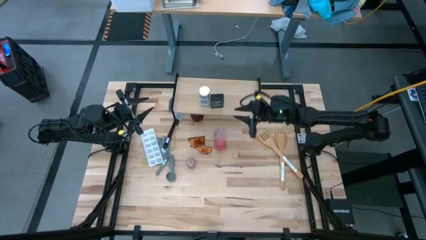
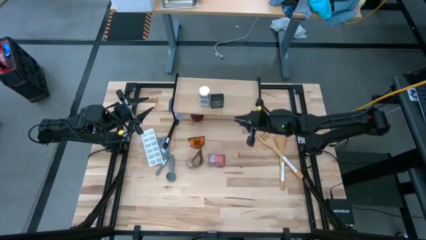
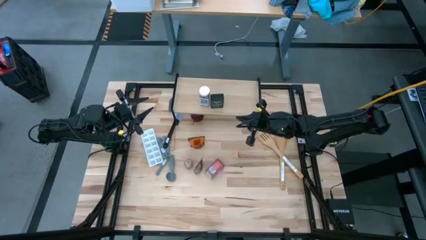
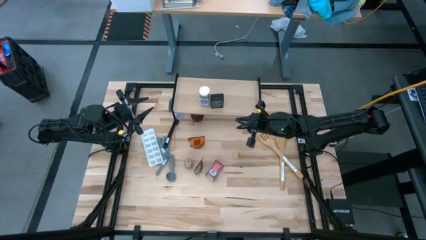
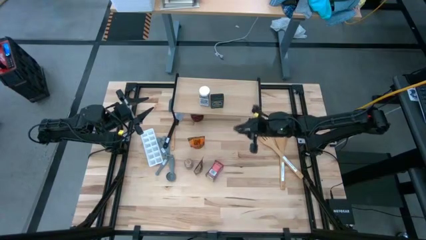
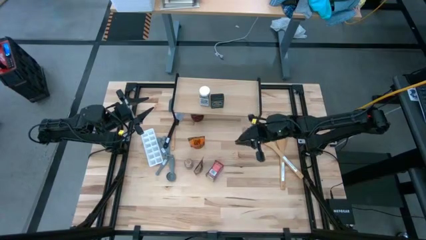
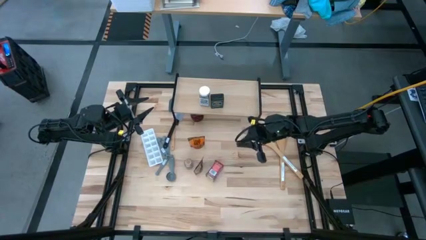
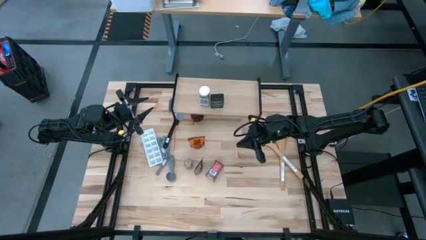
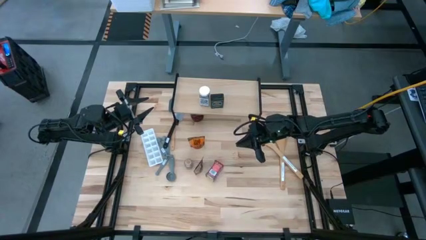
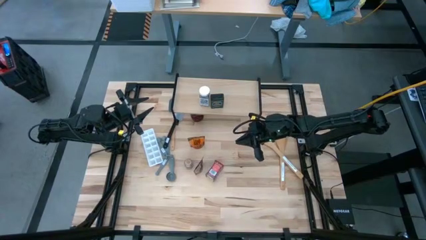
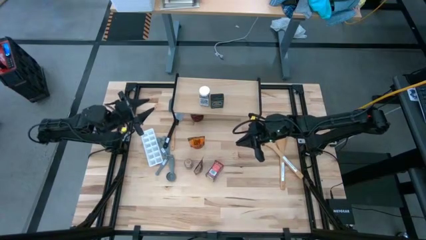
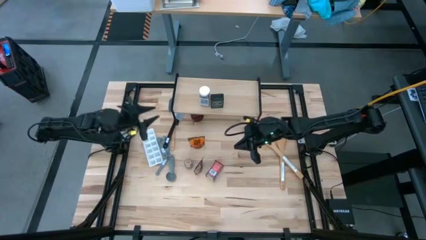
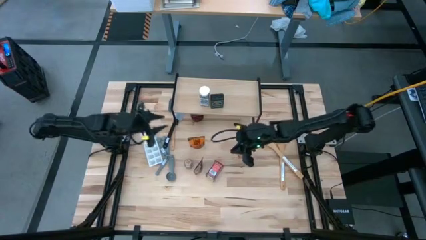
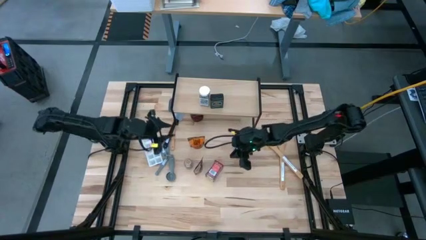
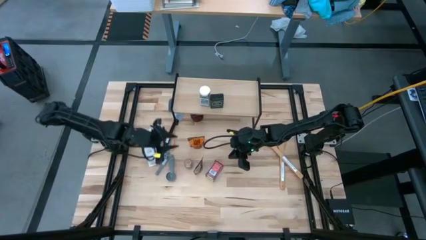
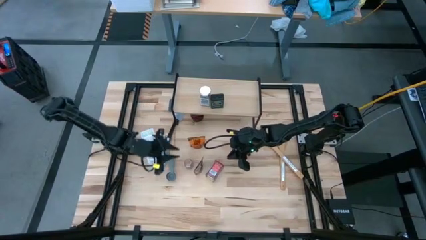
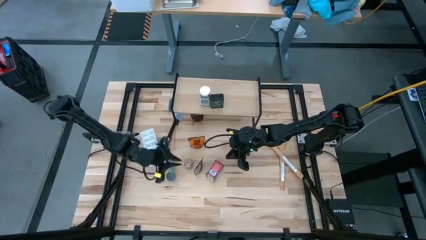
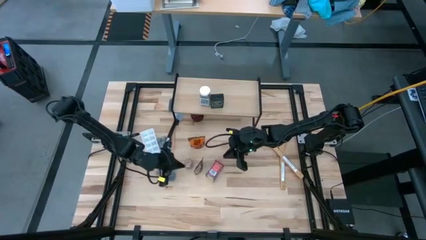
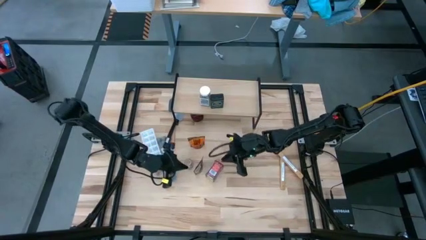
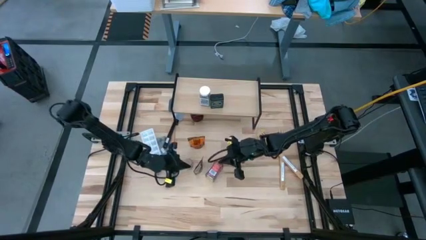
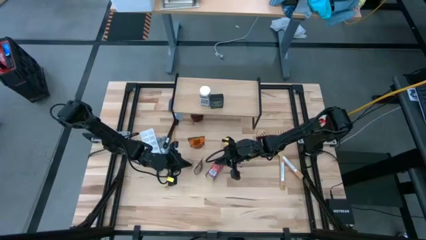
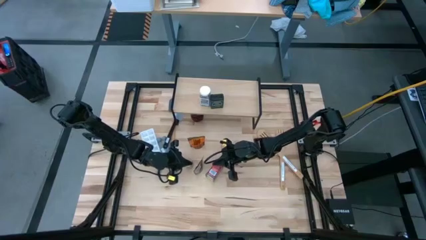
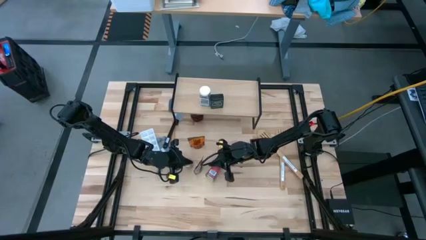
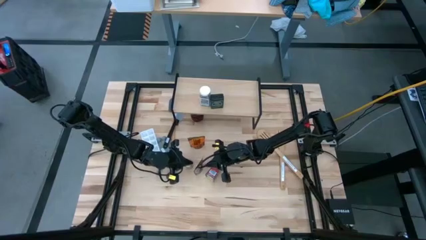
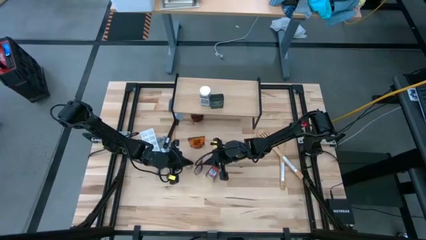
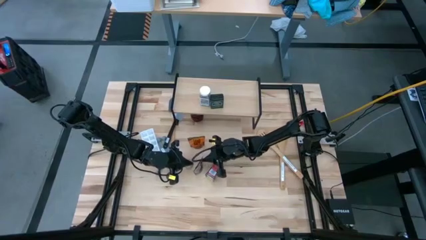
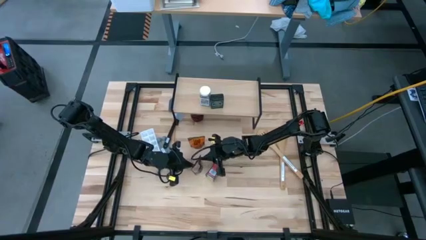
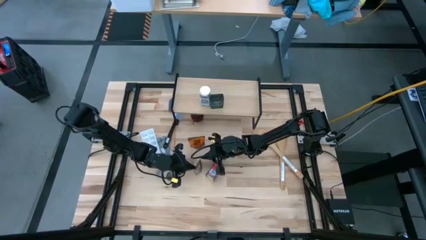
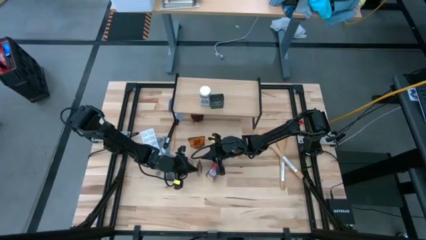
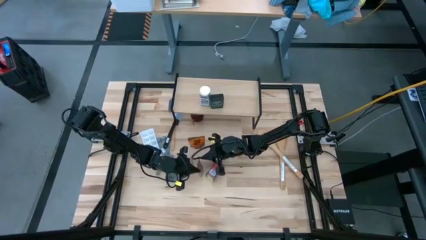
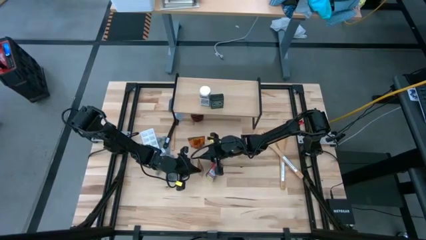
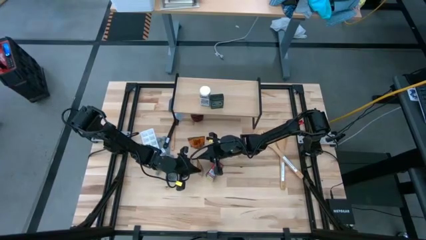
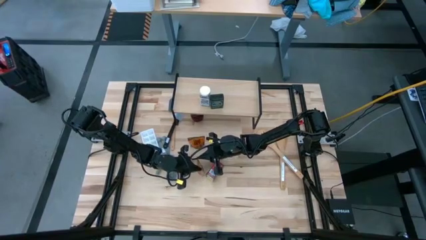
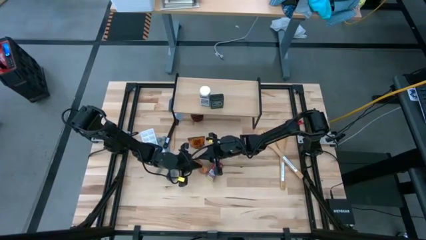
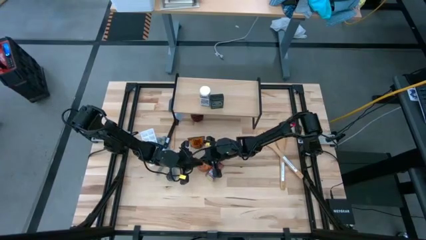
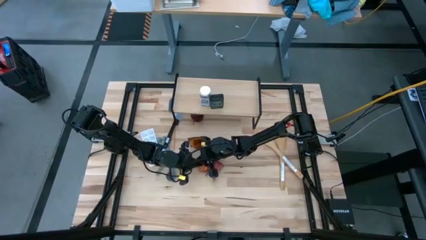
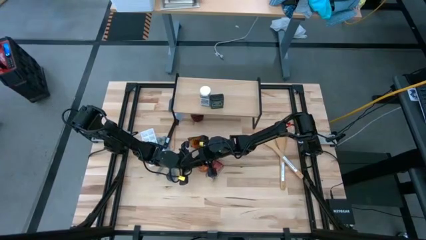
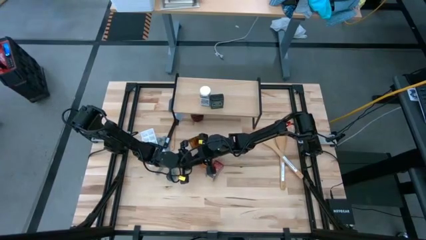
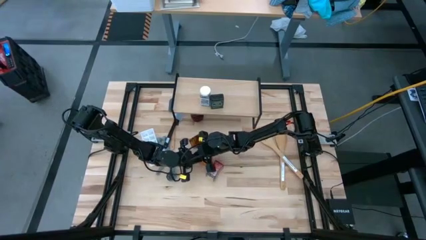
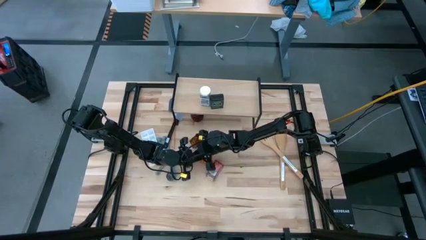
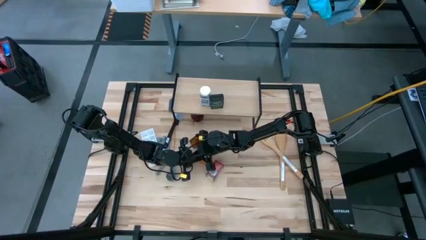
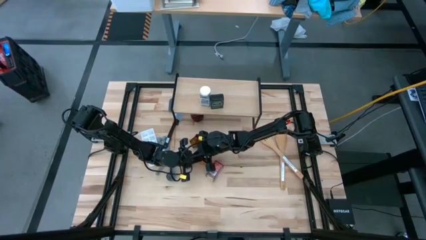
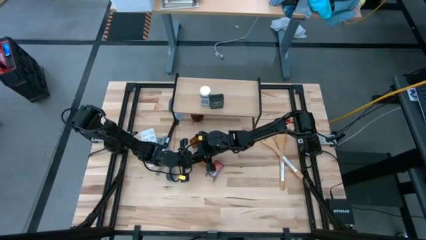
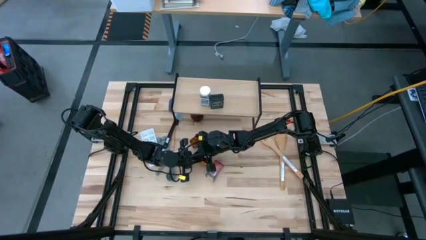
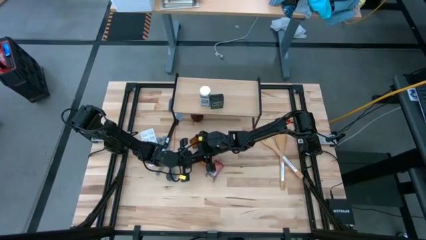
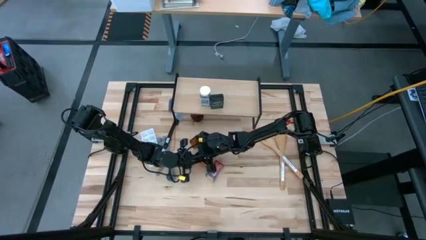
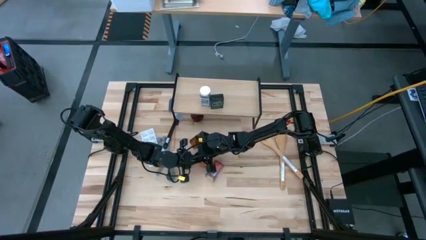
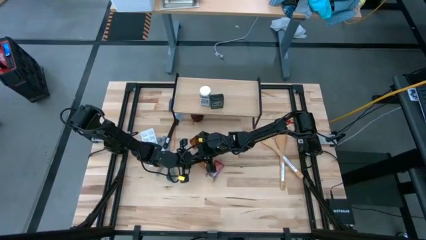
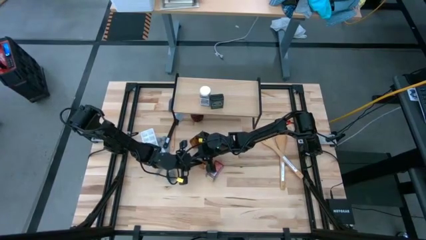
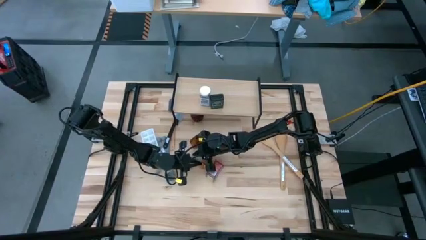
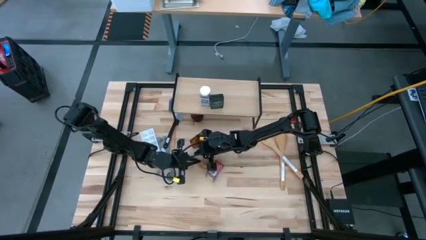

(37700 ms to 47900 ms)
Task: Shelf spices
Adjust the bottom orange seasoning pack

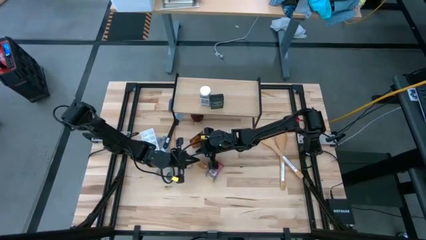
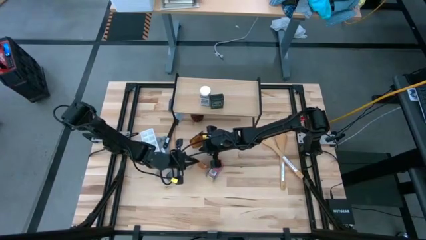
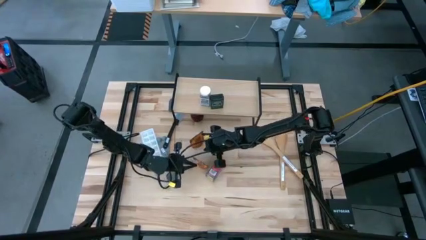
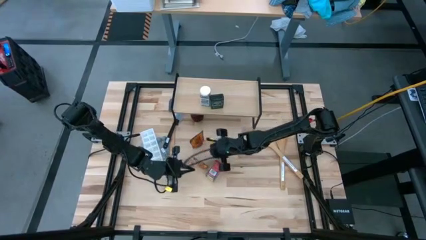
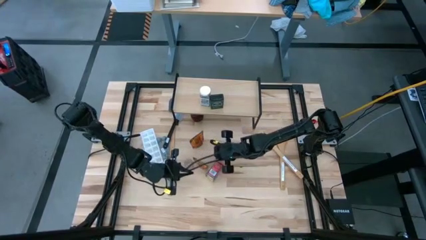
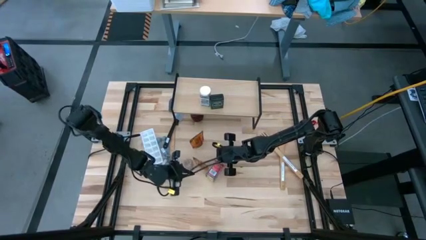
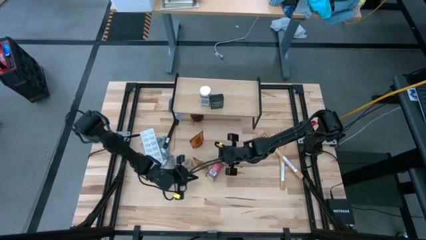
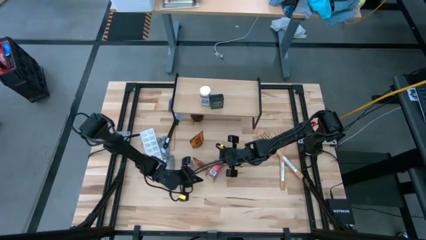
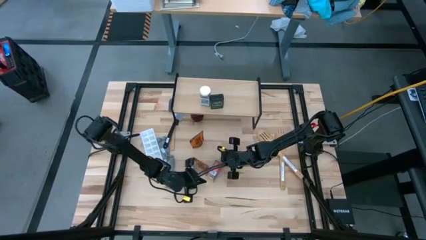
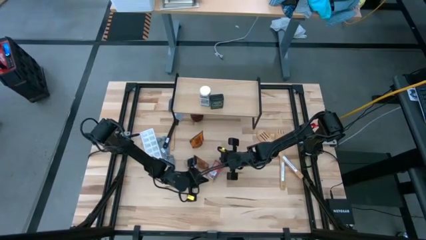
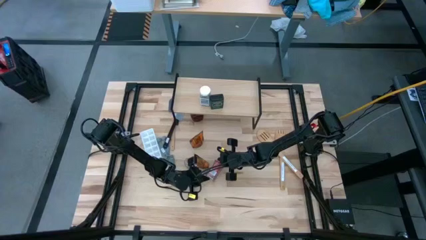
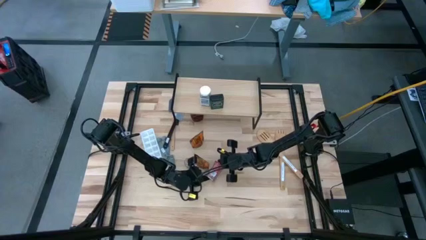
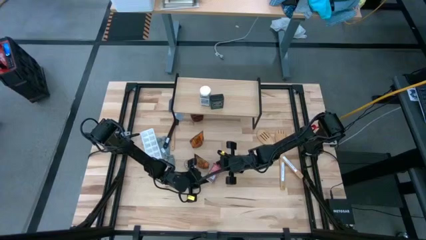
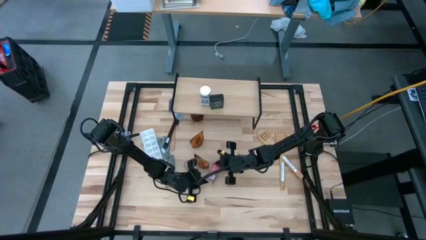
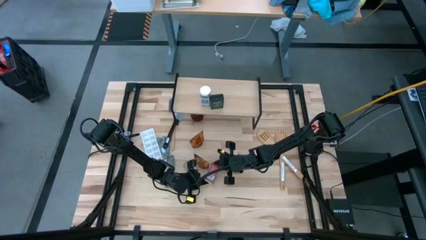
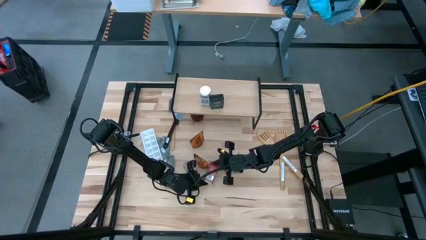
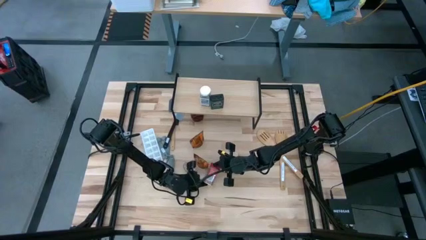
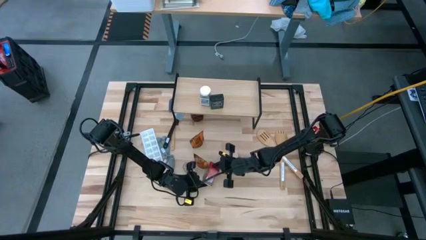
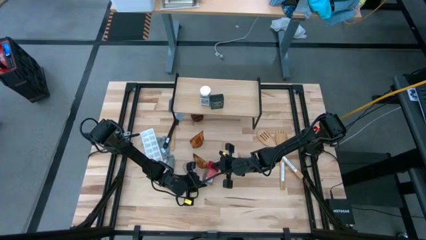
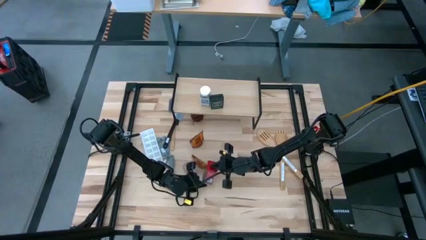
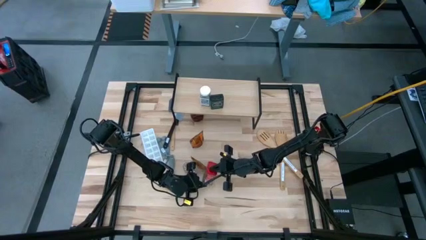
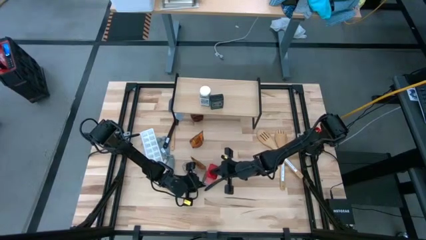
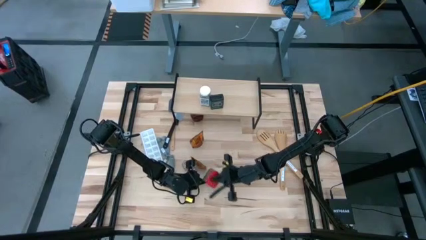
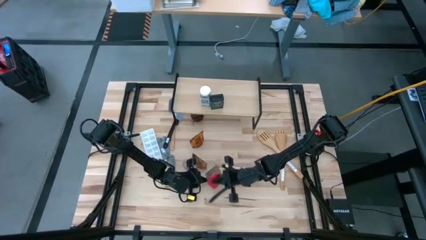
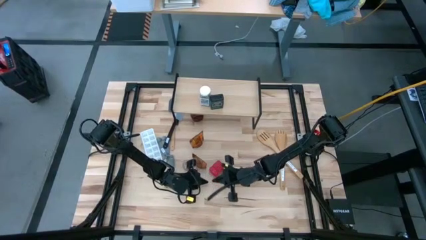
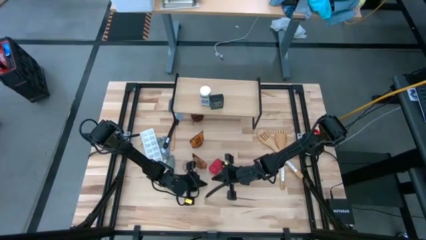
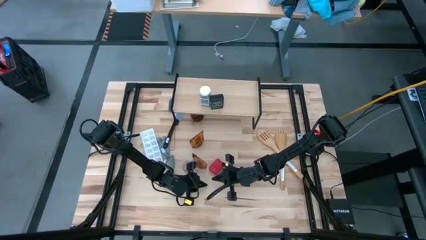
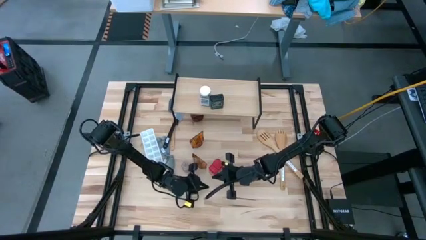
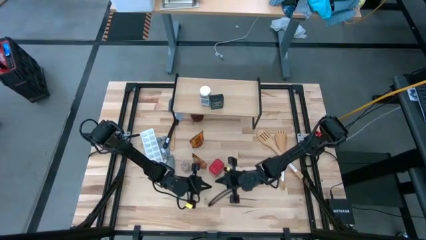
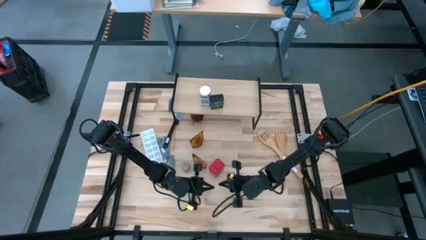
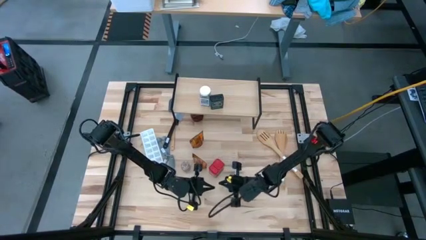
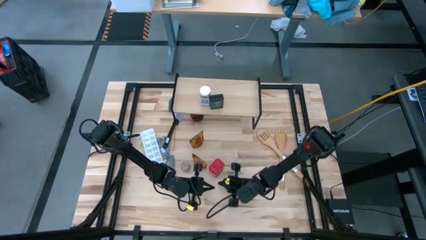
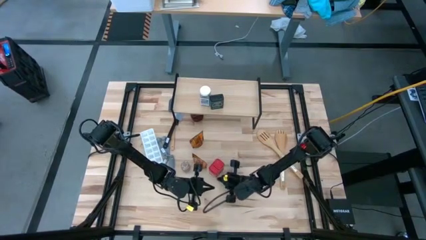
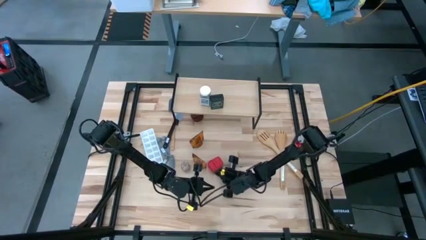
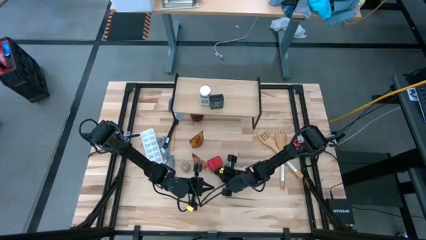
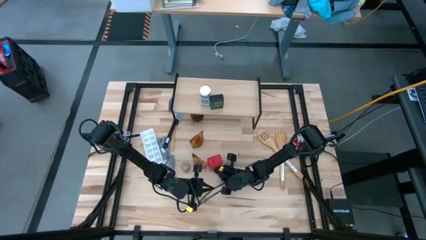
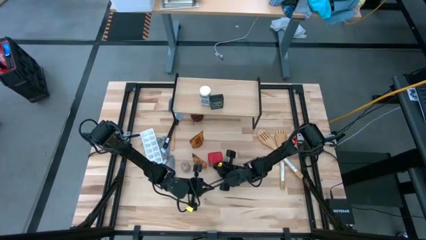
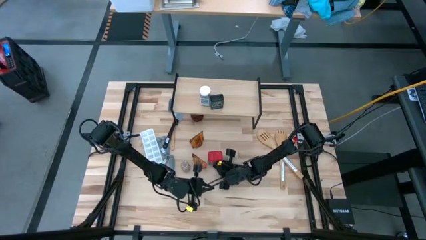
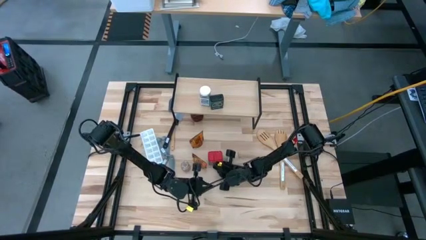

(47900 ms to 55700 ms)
Adjust the red seasoning can
